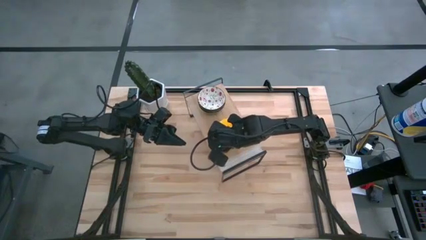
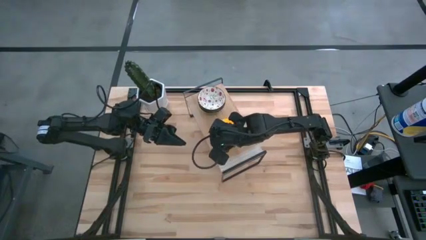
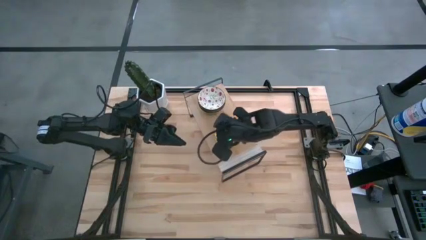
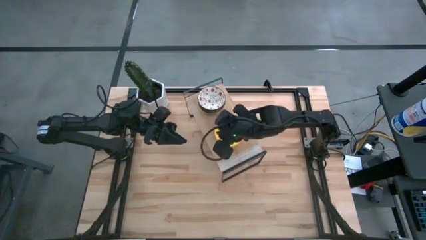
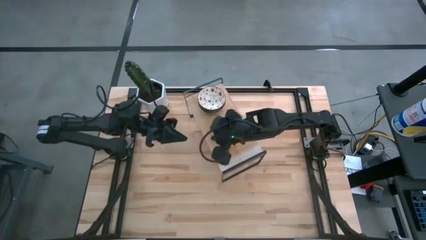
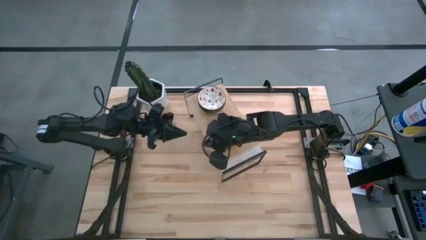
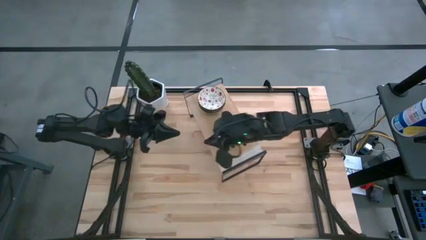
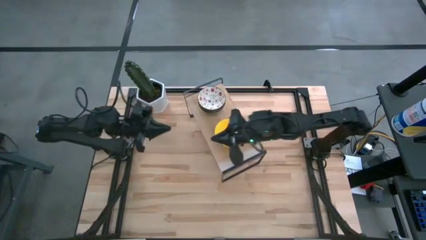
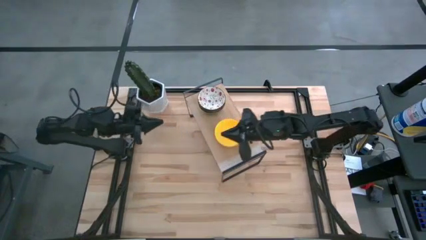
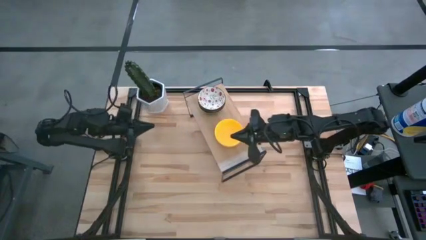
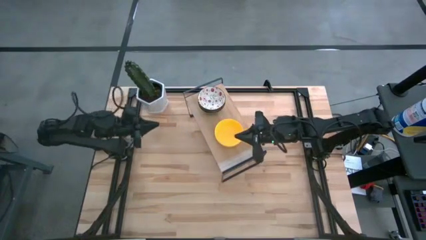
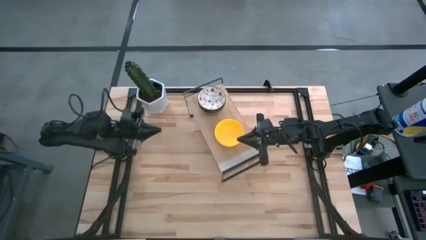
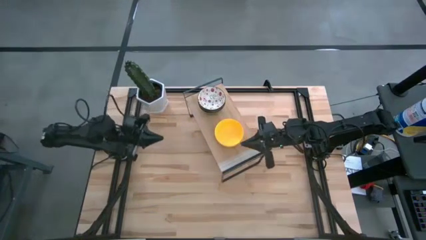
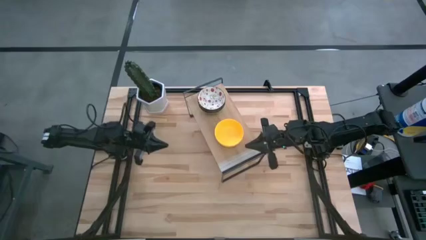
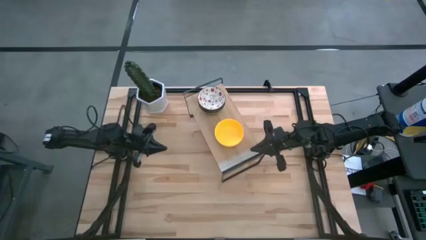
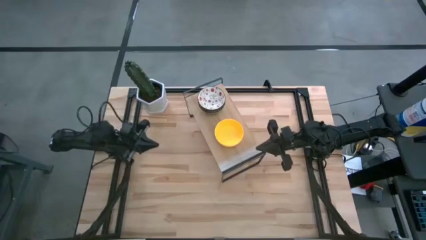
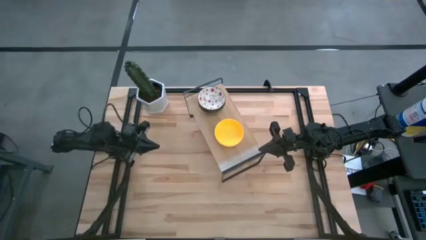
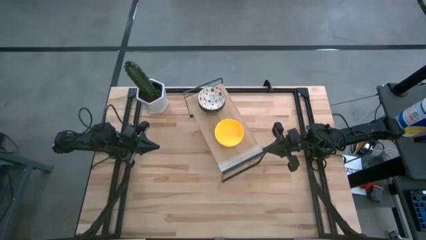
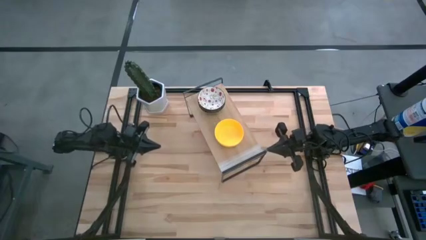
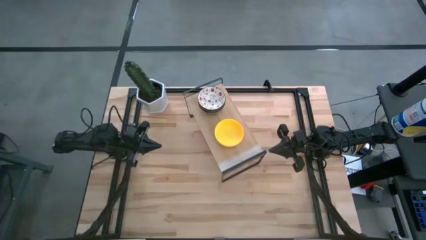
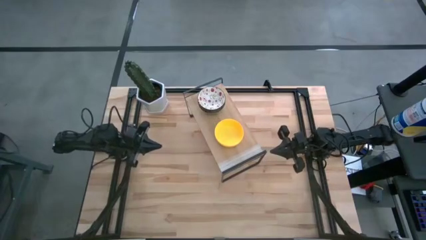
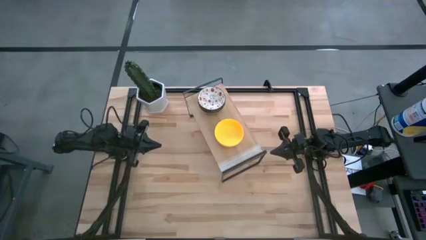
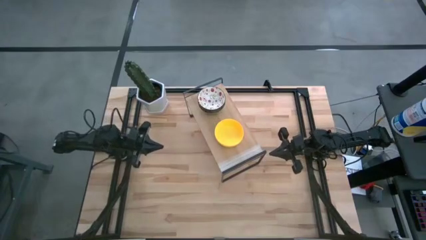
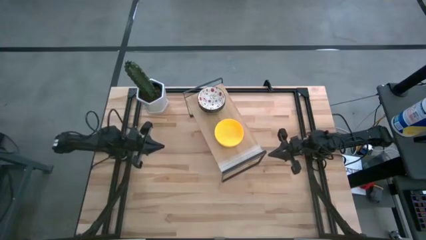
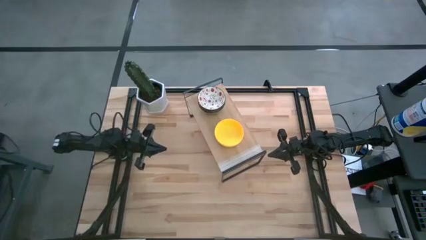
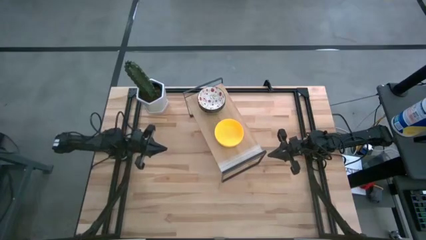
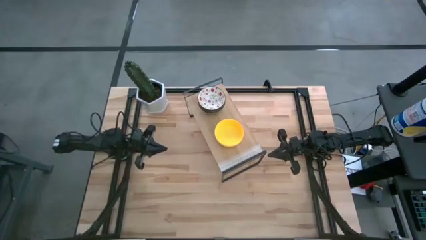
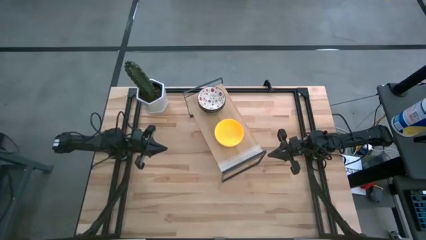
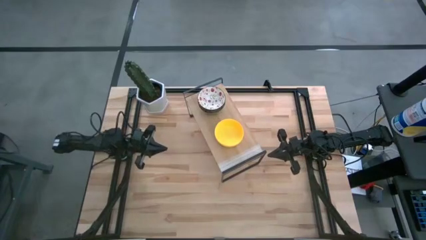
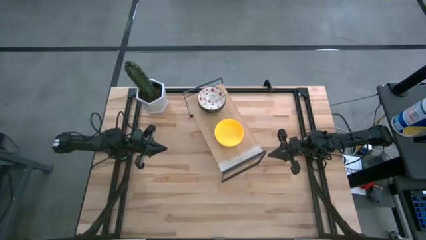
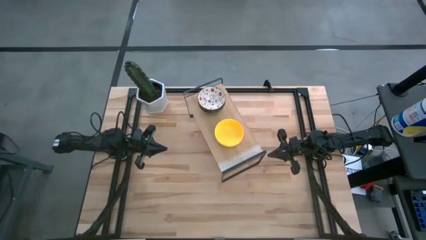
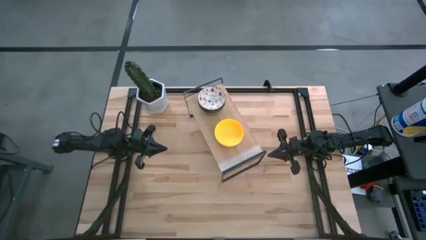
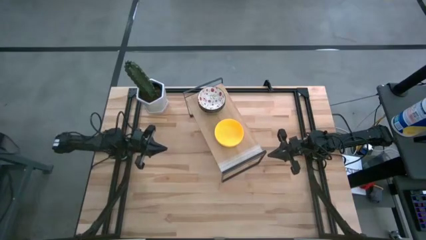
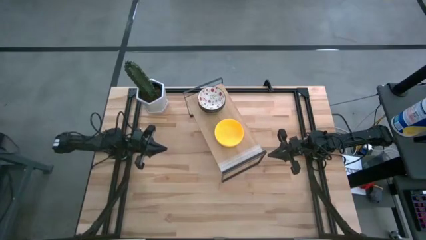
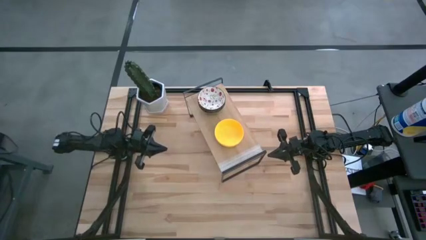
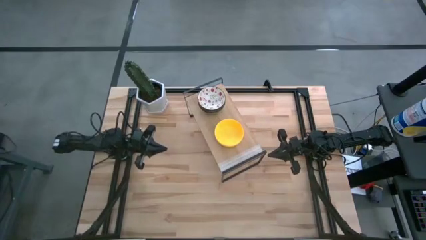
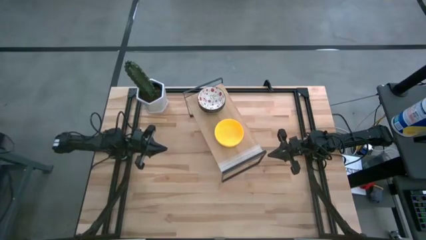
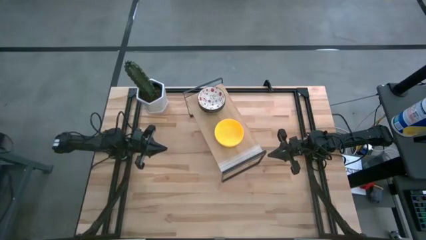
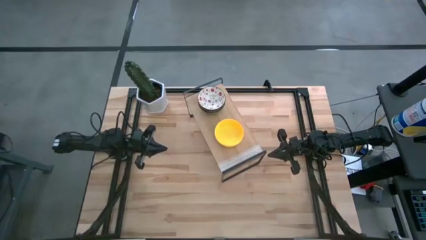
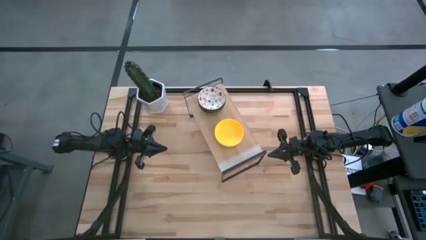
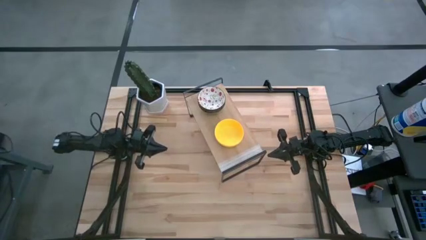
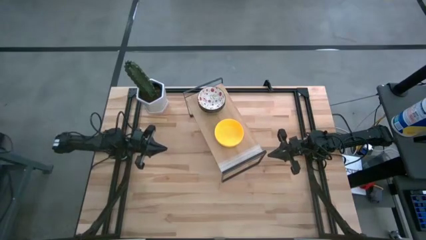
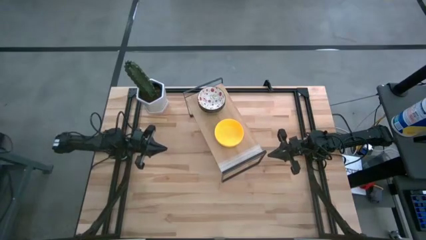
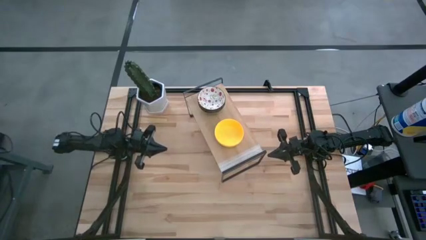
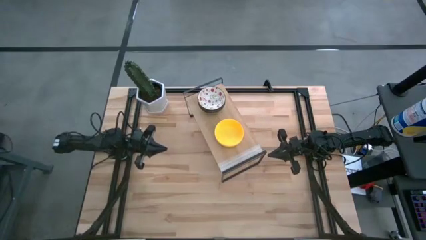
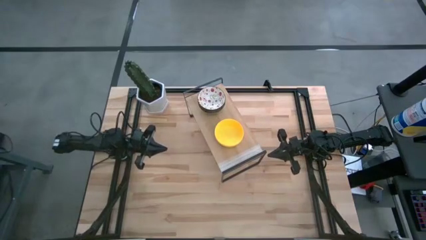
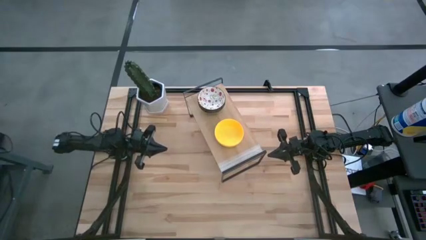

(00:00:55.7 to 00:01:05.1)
Task: Pick & Place Mini bowls
Return to Home Position

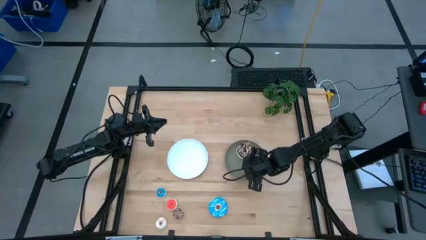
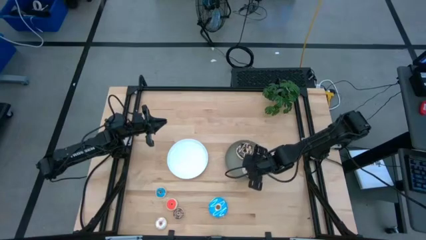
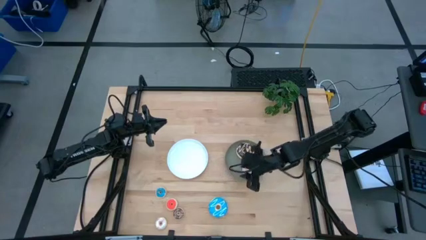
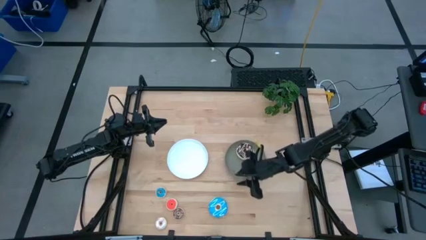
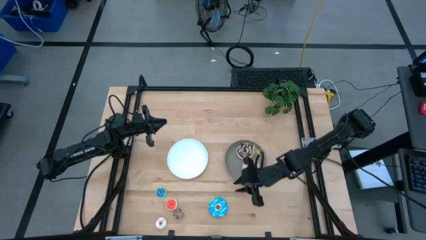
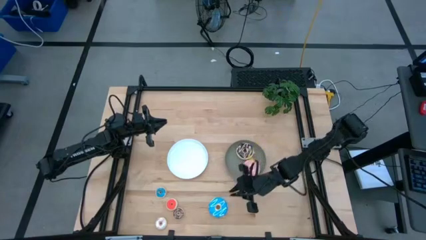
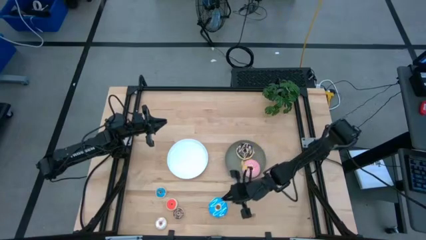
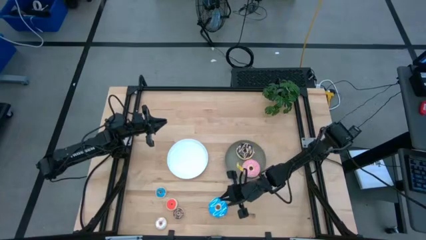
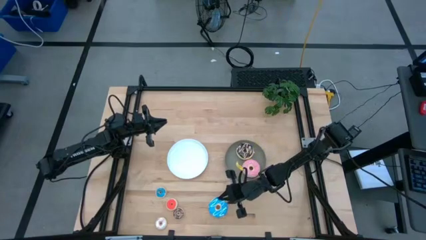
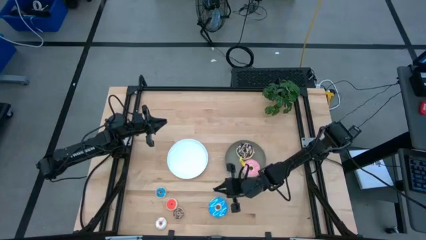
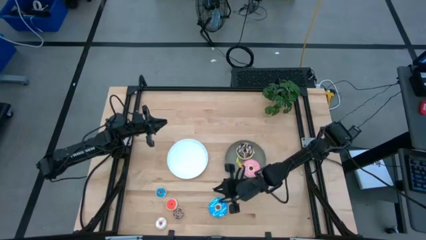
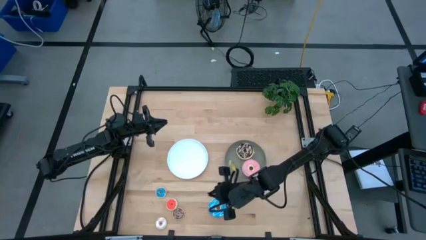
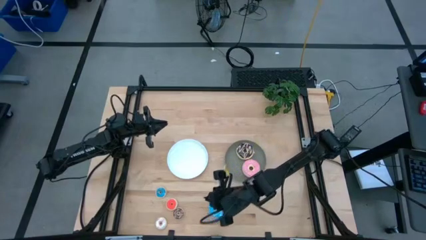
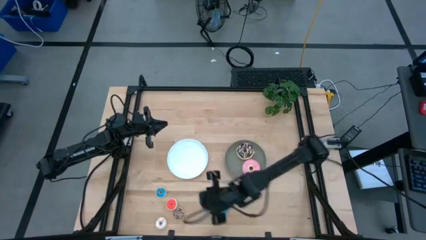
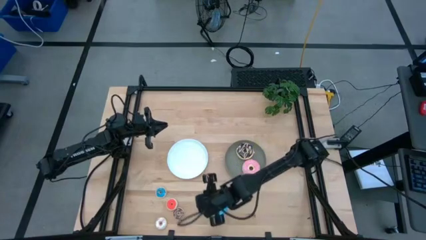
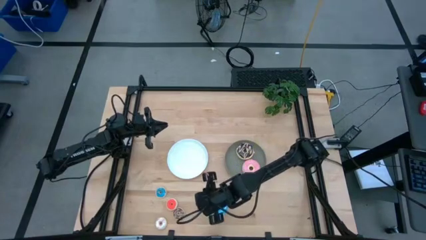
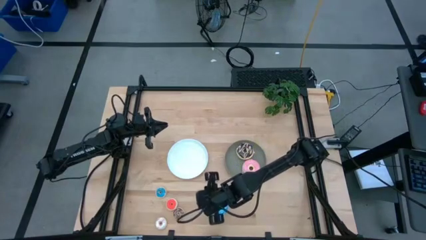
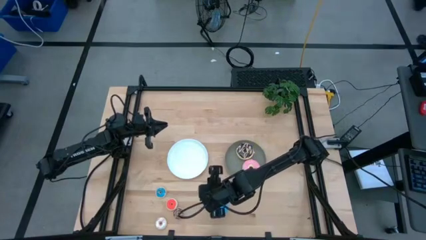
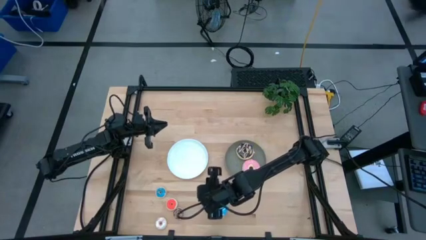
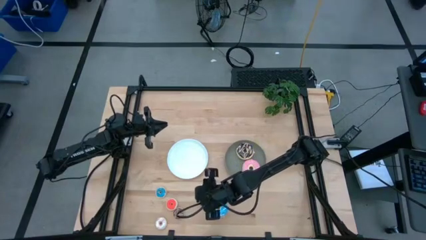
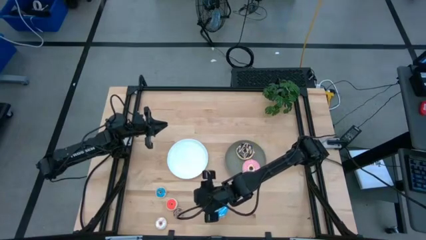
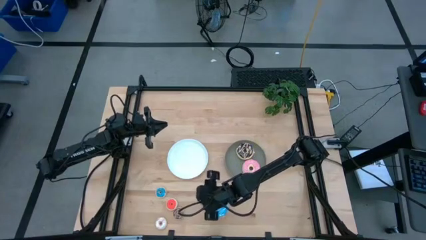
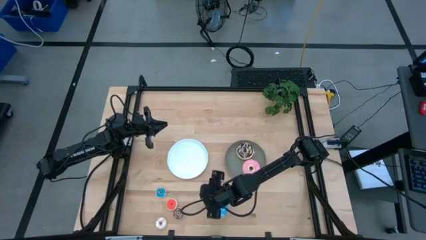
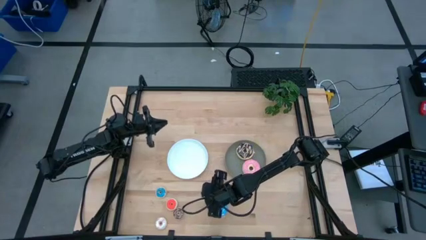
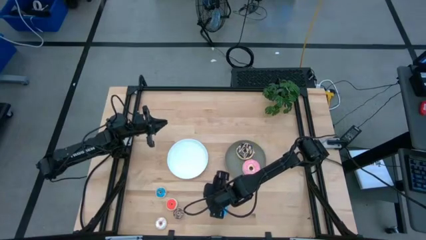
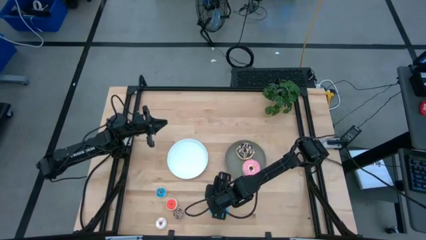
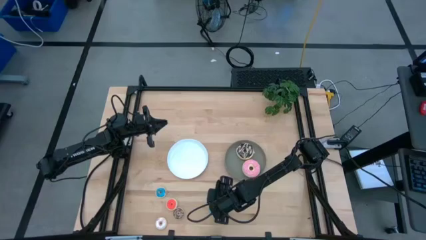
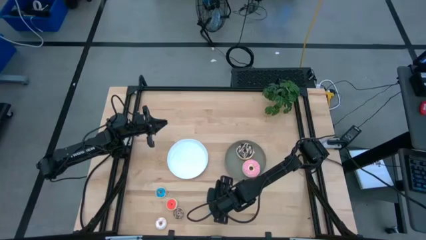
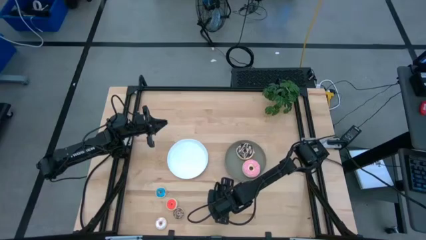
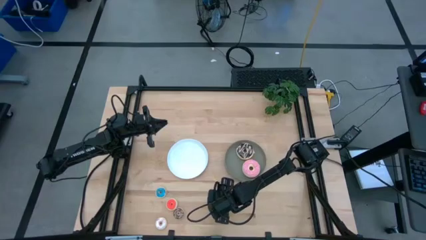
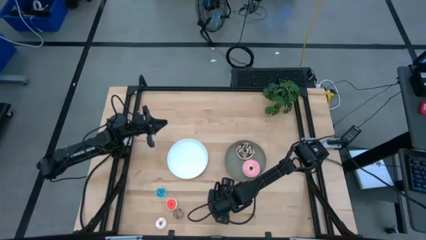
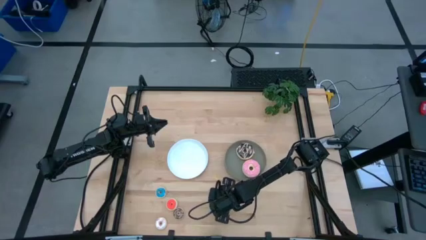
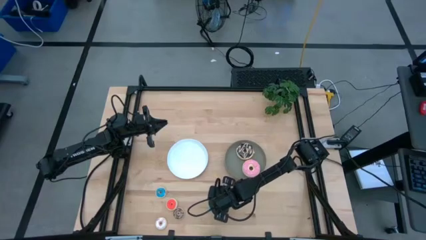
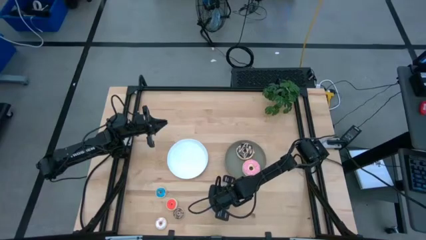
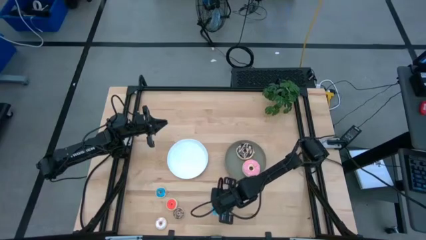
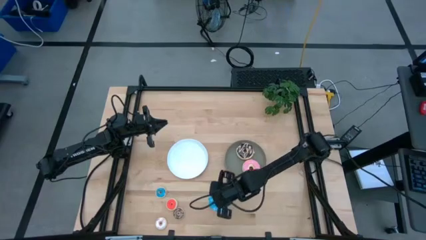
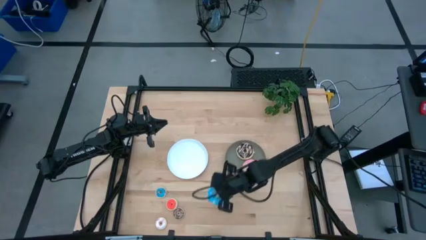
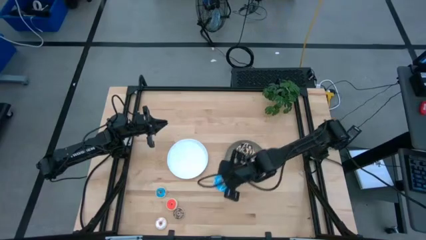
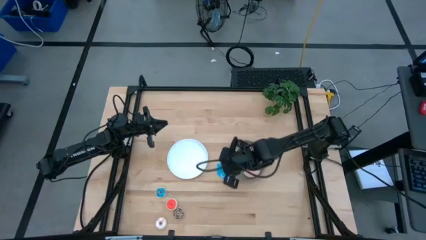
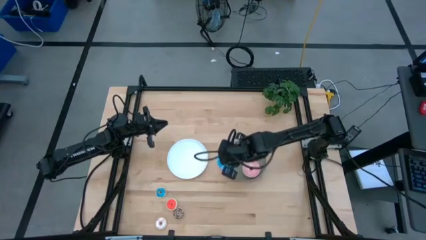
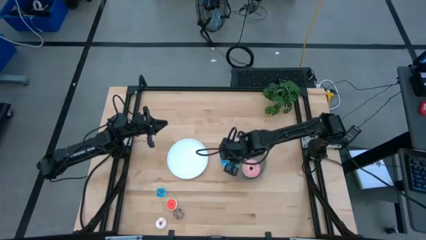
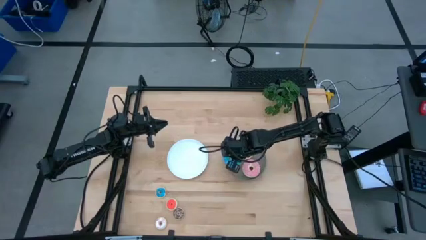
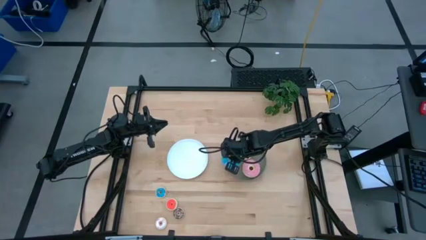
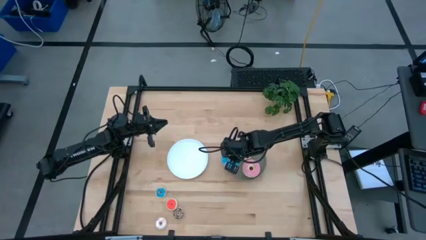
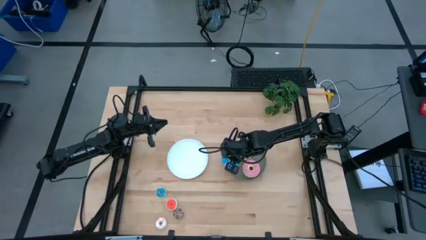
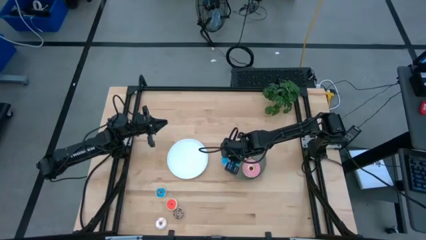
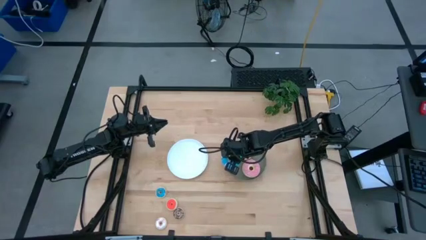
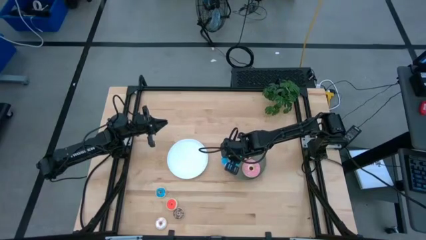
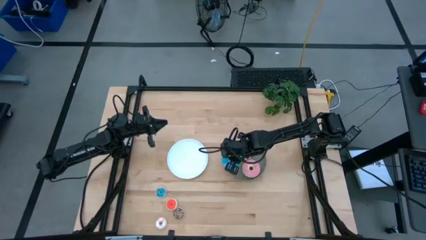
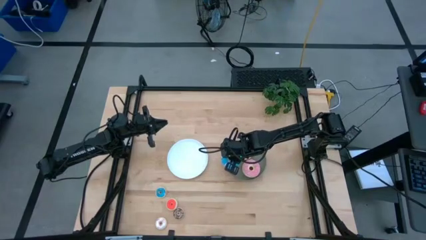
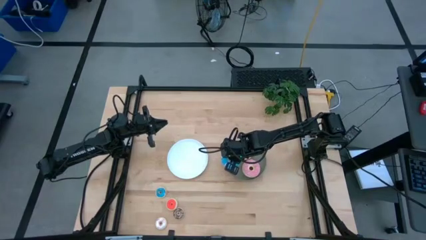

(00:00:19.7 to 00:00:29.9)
Task: Pick & Place donuts
Put the large blue donut on the gray plate
